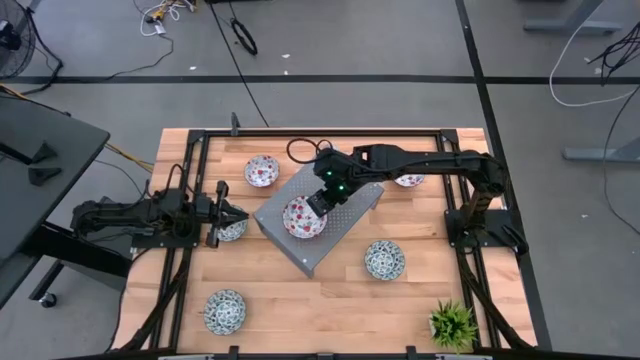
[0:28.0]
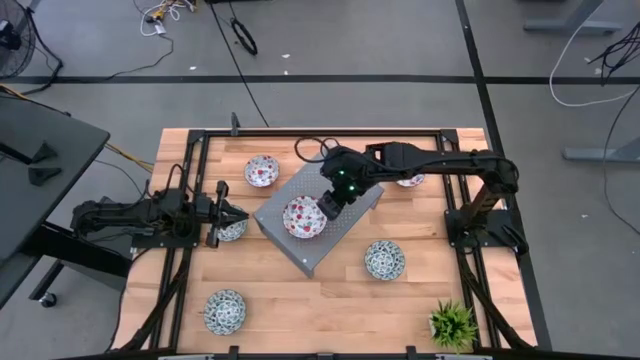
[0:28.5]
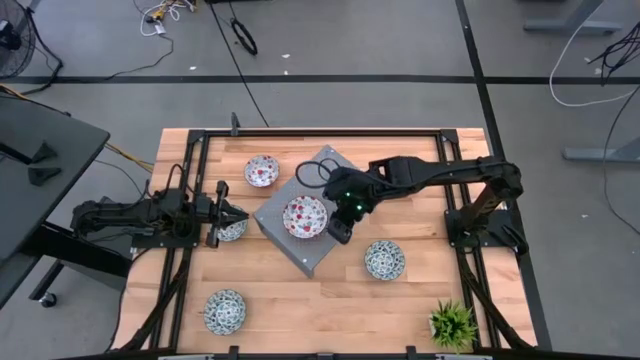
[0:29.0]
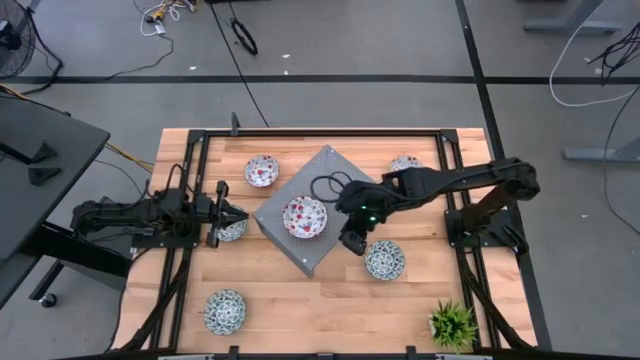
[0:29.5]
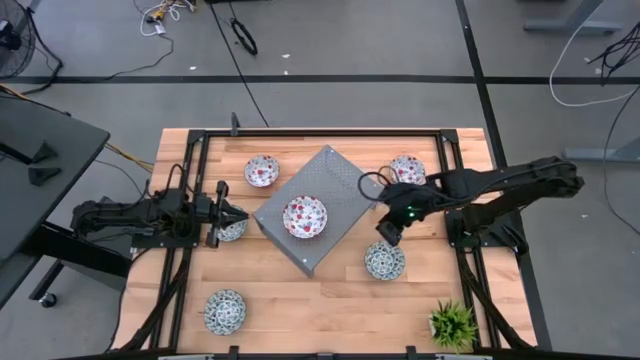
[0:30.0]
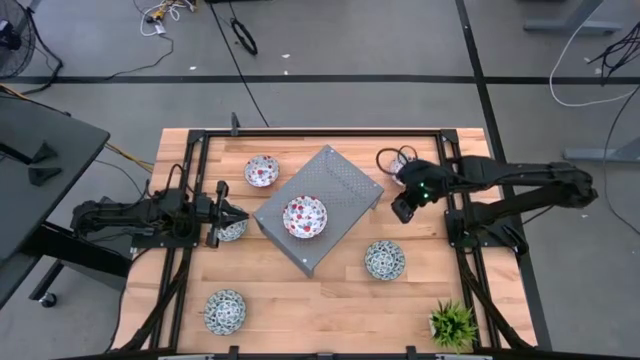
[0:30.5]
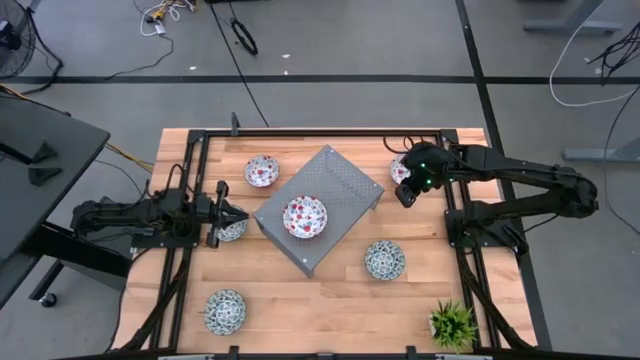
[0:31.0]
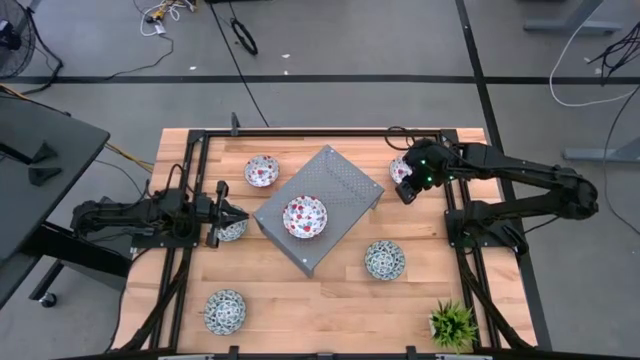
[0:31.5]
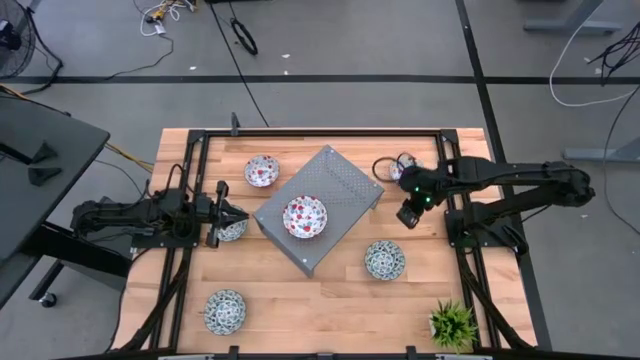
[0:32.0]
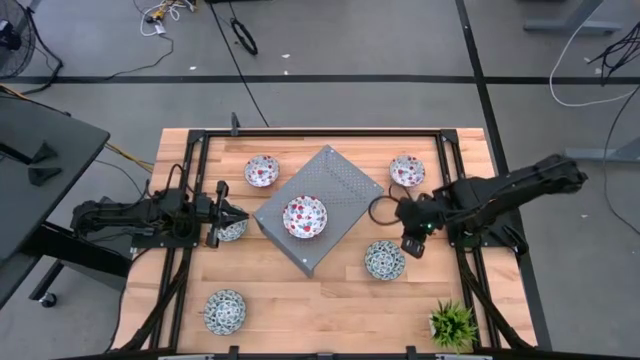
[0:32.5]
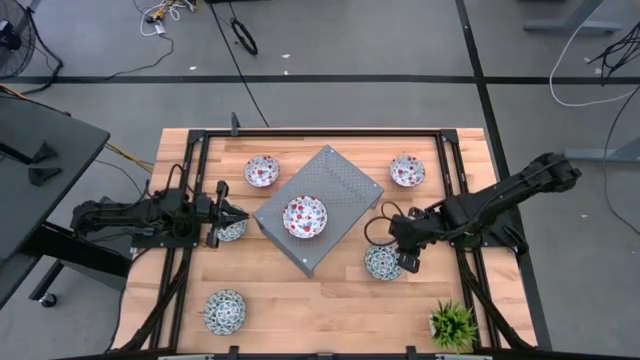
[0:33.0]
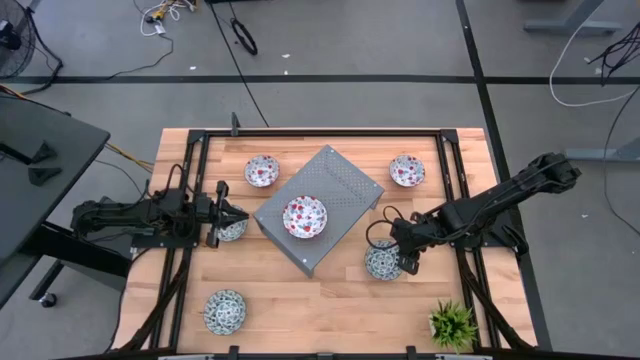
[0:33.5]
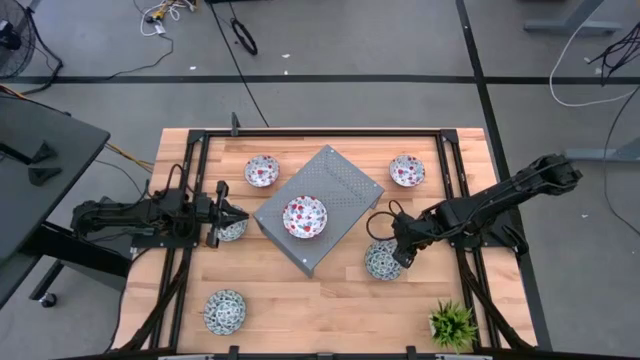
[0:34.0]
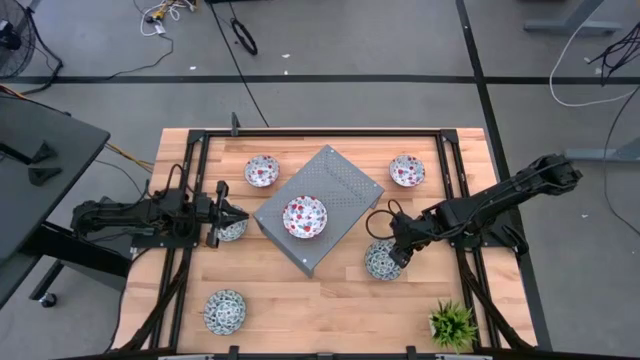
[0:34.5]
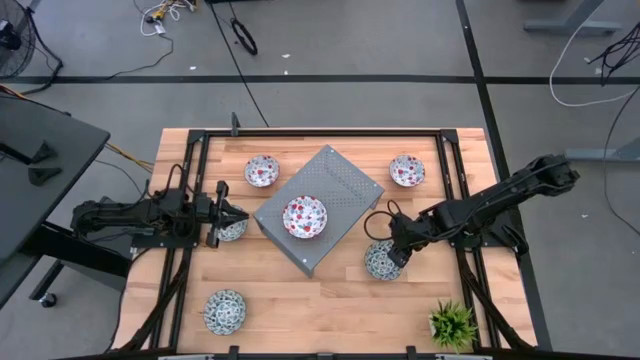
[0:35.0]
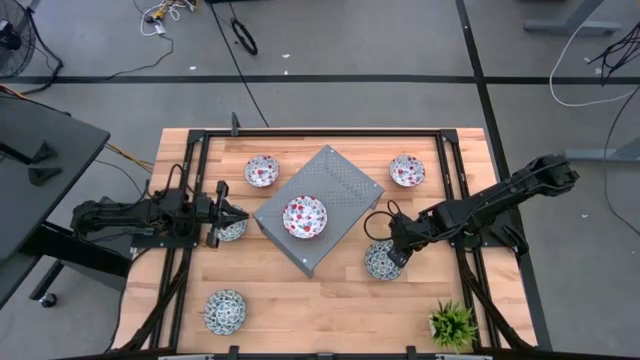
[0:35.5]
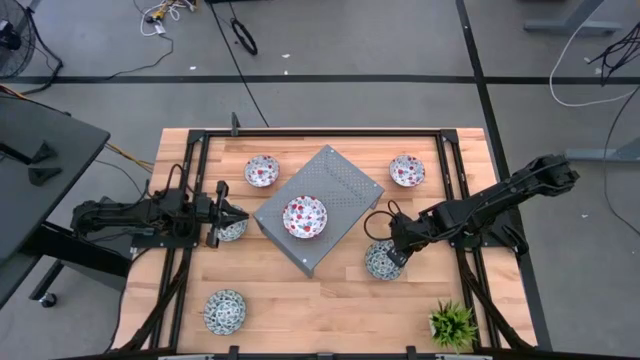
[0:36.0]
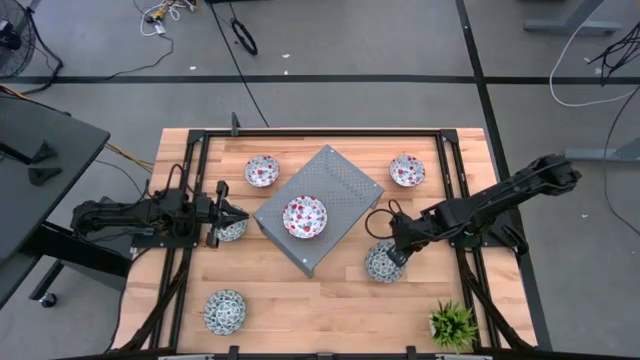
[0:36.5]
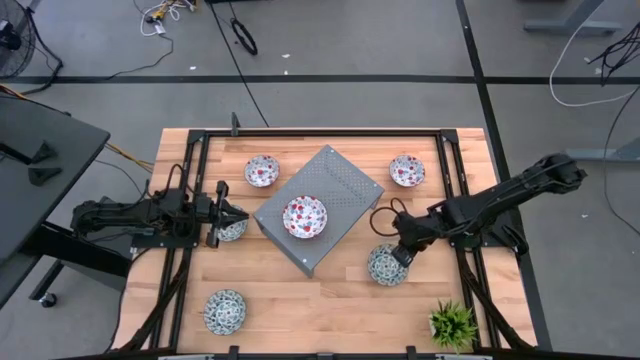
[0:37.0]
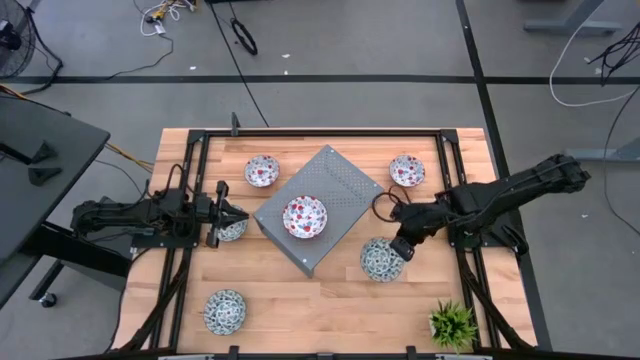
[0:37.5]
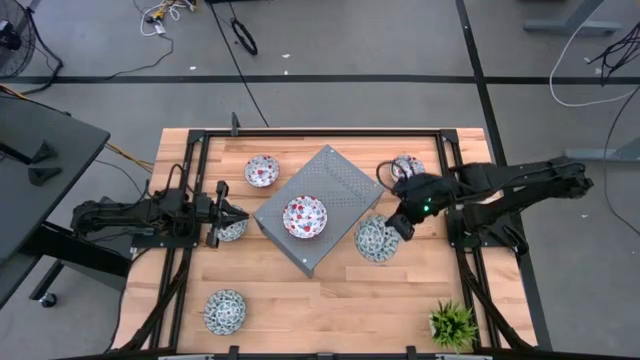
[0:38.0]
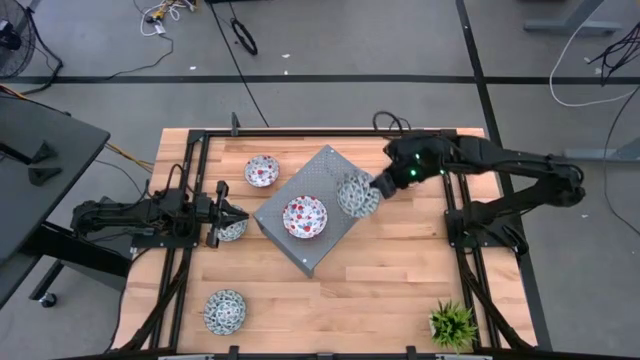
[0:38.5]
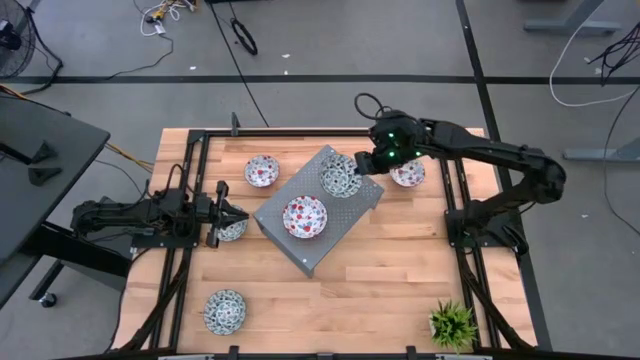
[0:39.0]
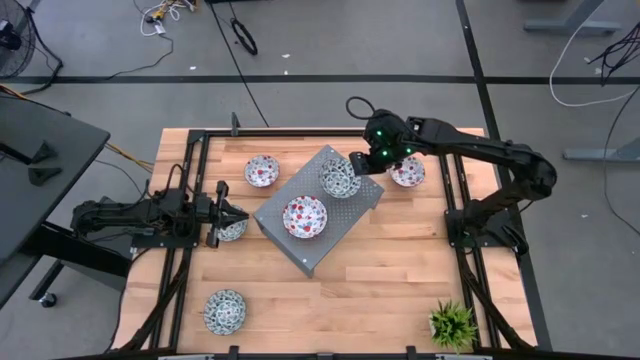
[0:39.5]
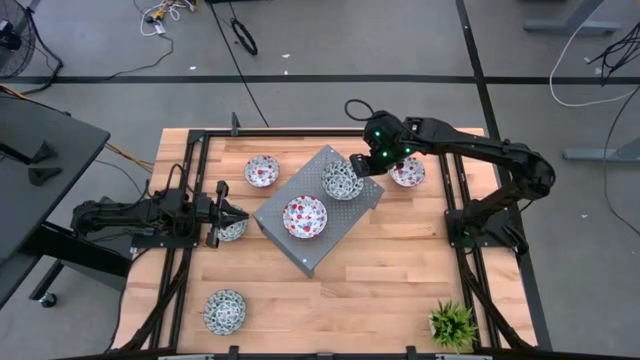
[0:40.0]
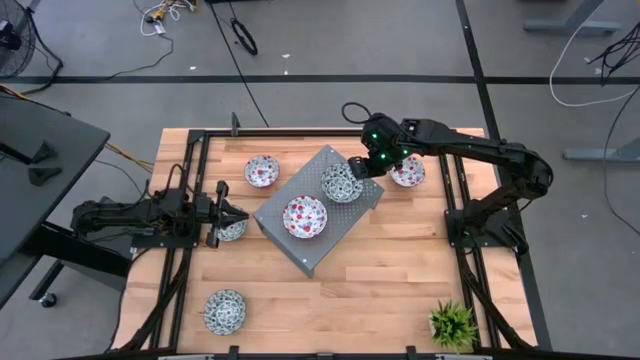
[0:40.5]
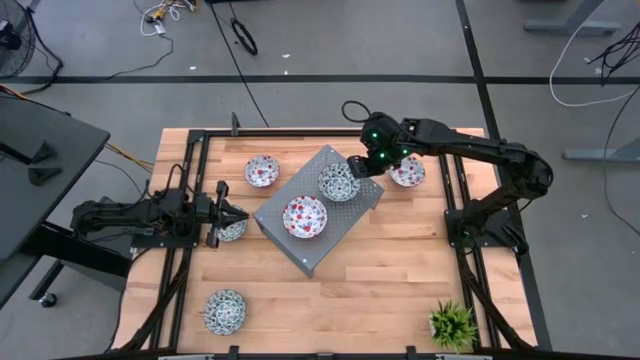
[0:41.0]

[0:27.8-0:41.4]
Task: Pick & Place Mini bowls
Put the right blue patterned bowl on the shelf

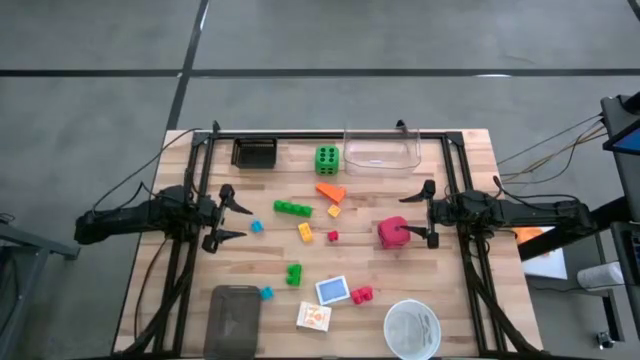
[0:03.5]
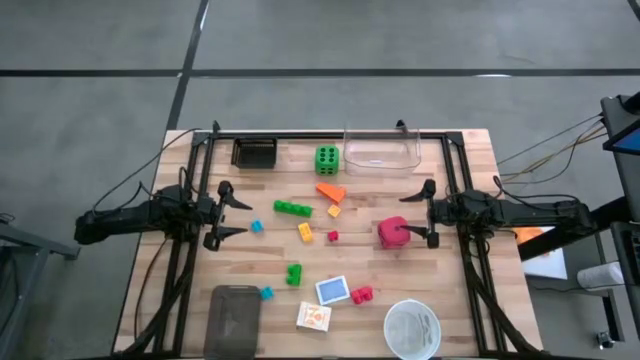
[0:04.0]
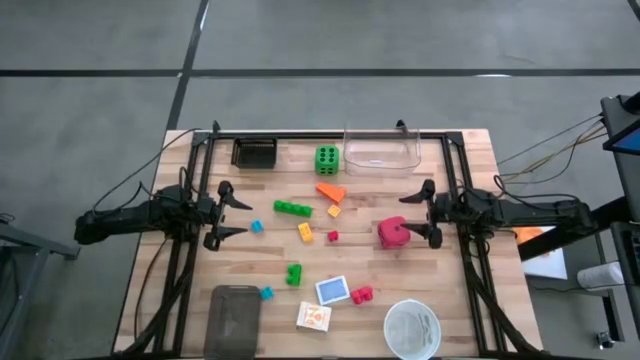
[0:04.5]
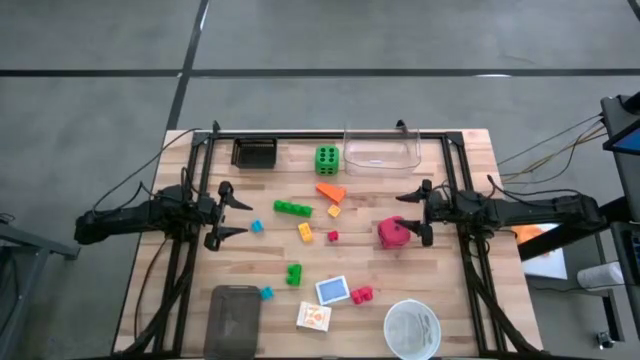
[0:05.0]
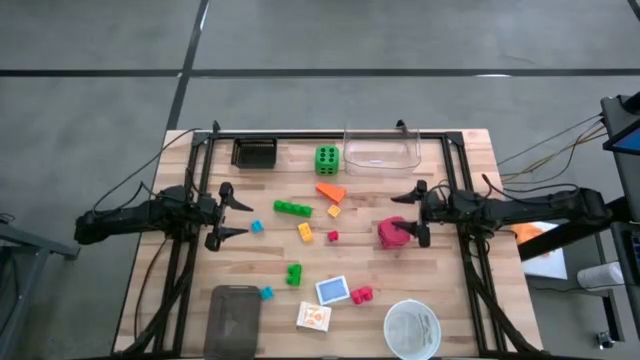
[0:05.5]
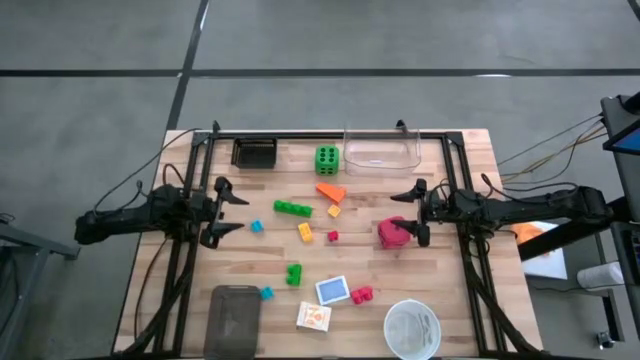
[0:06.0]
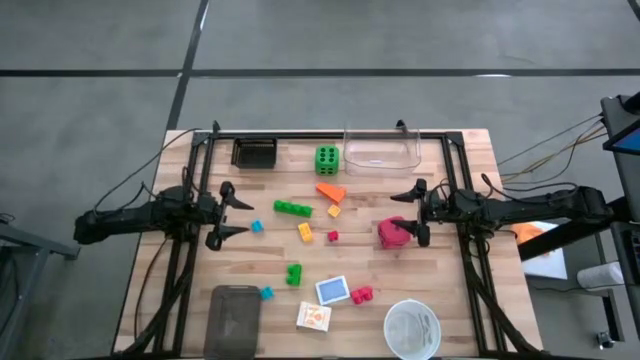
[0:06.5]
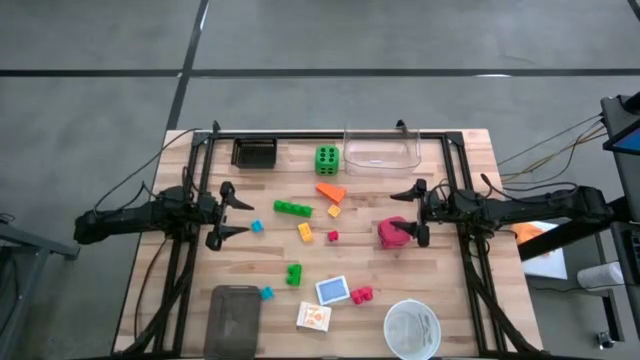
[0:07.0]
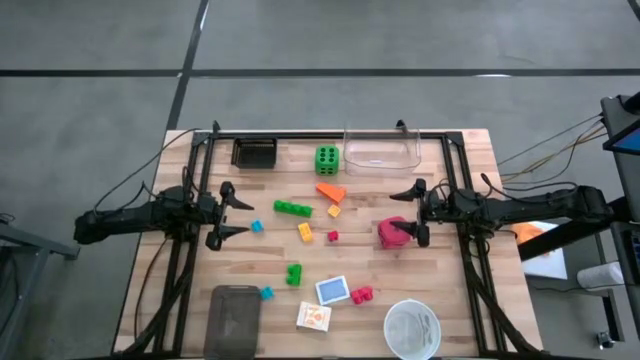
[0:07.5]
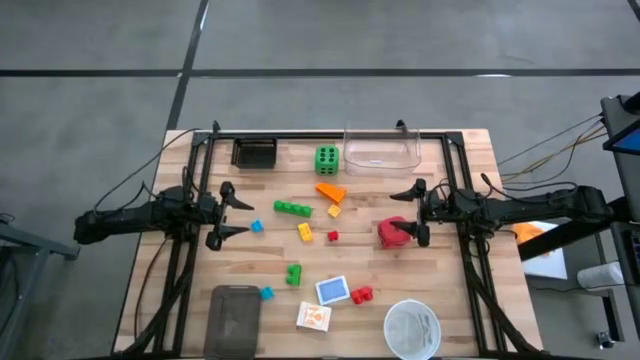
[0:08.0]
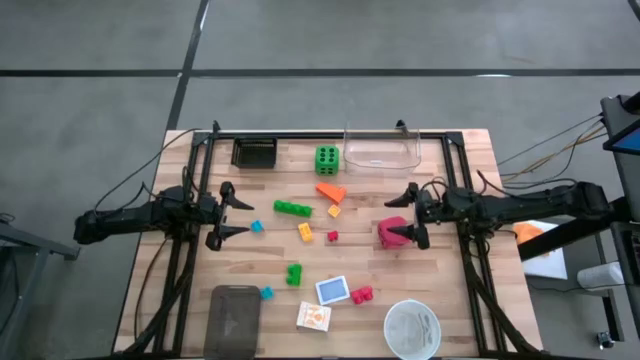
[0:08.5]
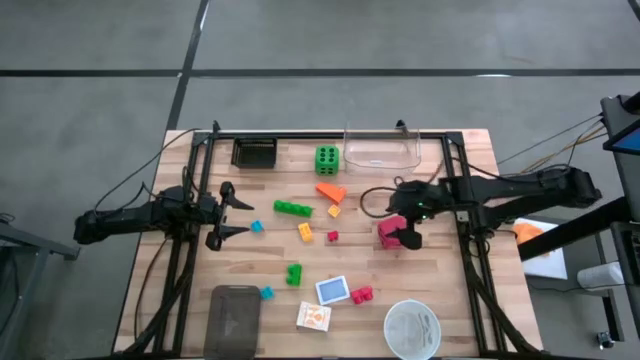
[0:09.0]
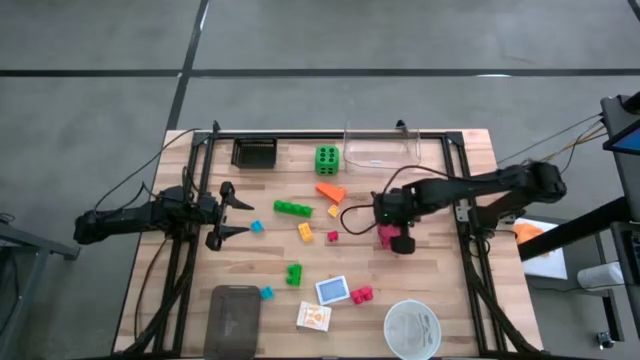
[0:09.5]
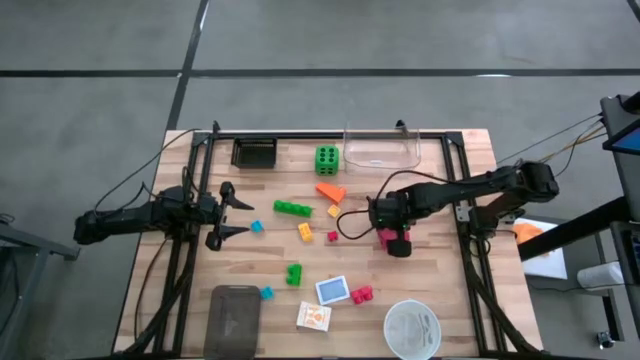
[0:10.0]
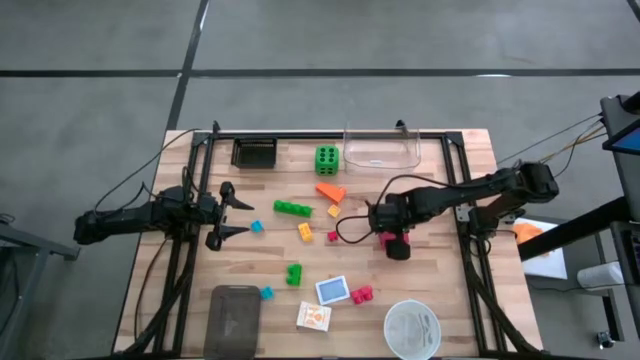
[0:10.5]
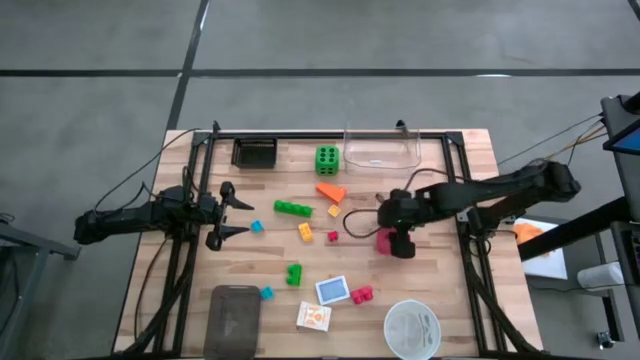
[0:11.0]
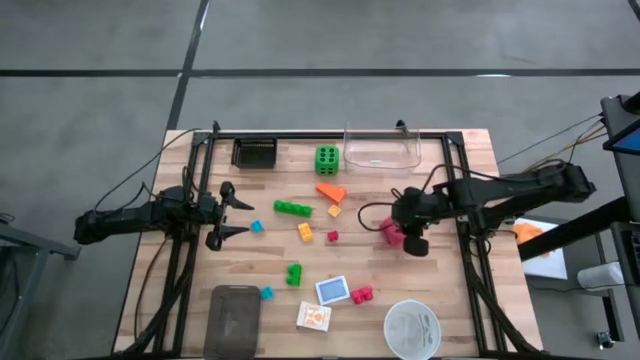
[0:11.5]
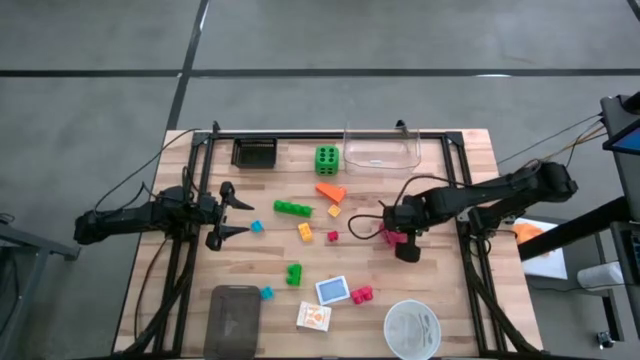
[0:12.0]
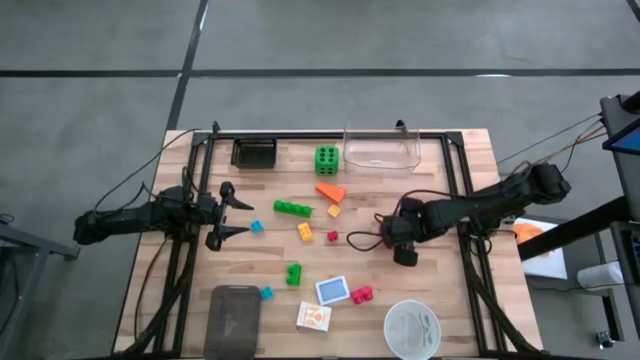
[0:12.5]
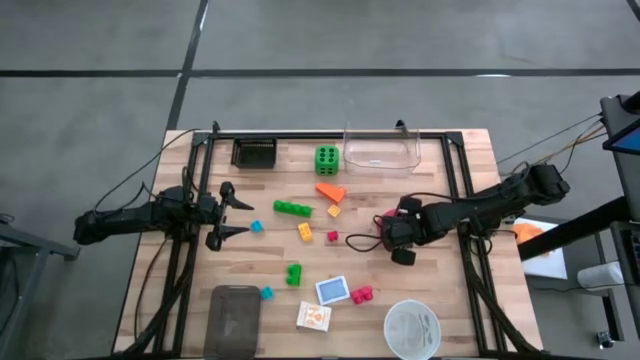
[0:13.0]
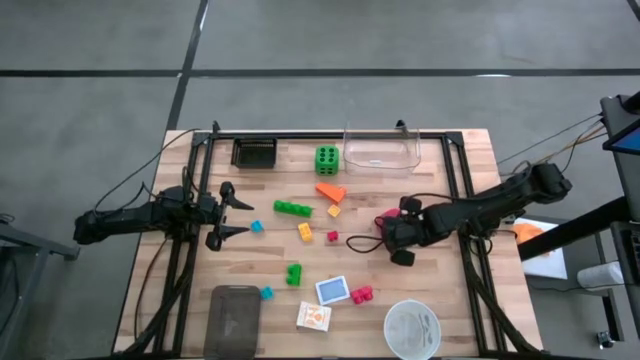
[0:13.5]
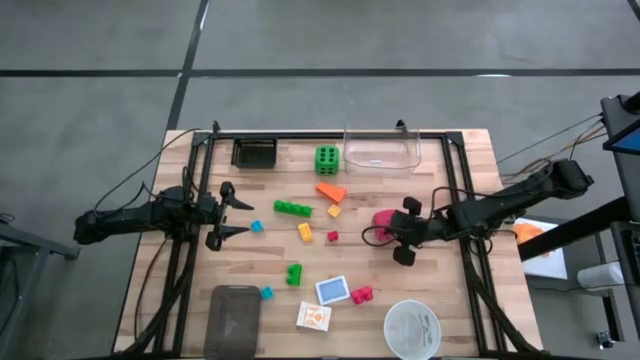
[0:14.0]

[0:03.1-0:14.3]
Task: Pick & Place Toys
Put the red die into the gray bin
